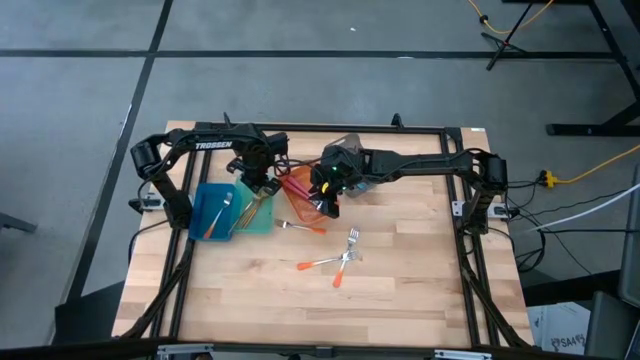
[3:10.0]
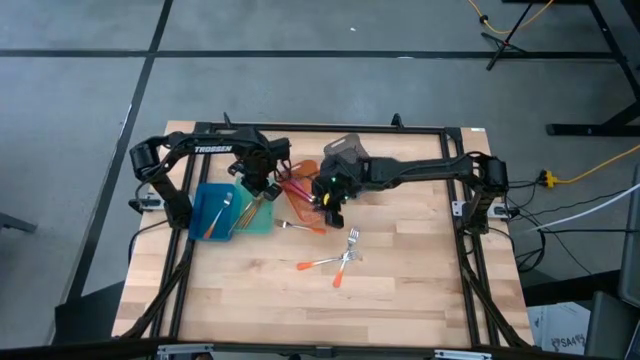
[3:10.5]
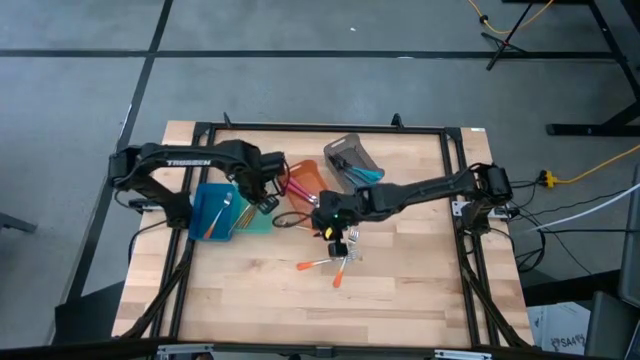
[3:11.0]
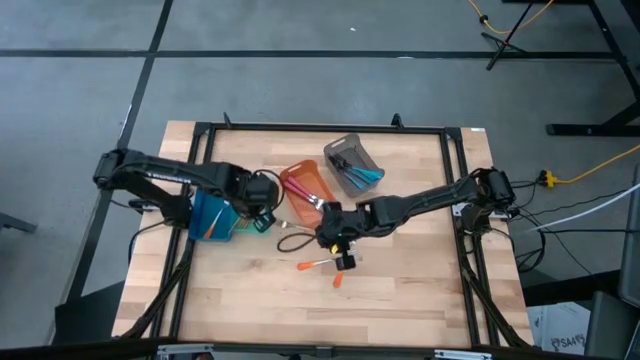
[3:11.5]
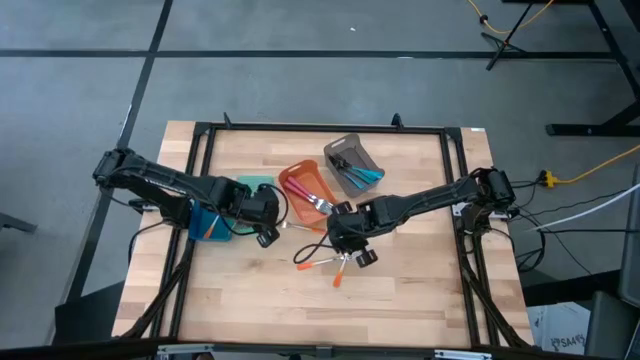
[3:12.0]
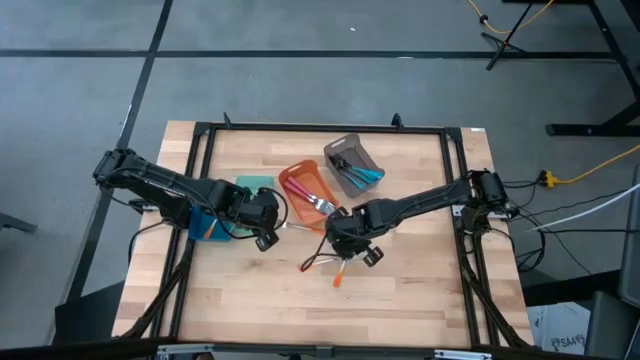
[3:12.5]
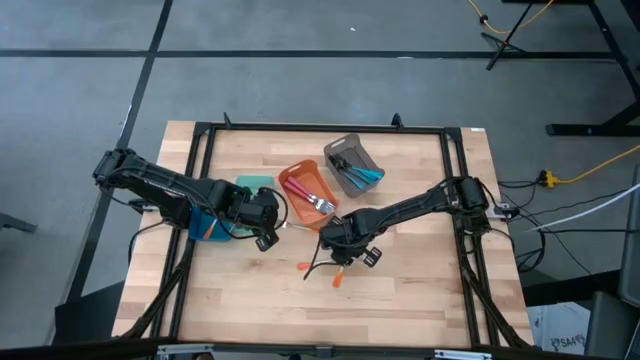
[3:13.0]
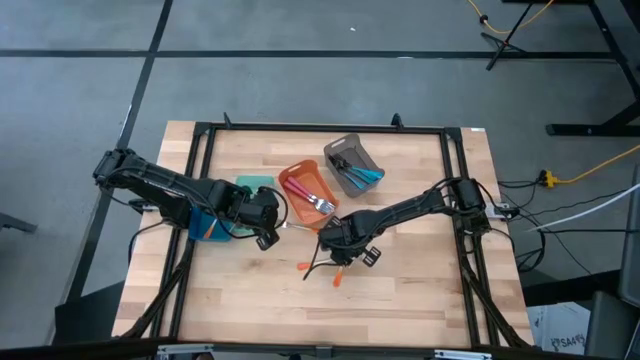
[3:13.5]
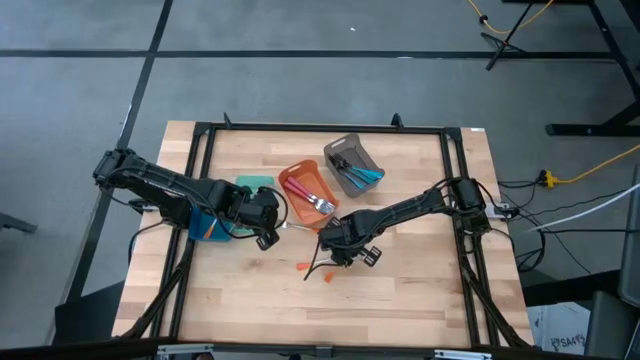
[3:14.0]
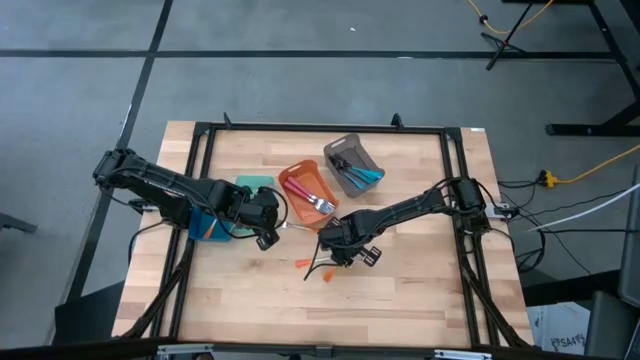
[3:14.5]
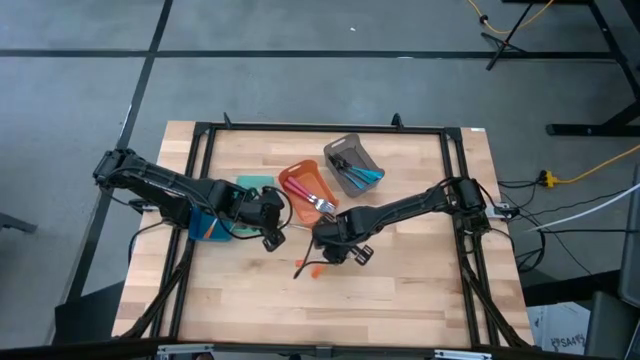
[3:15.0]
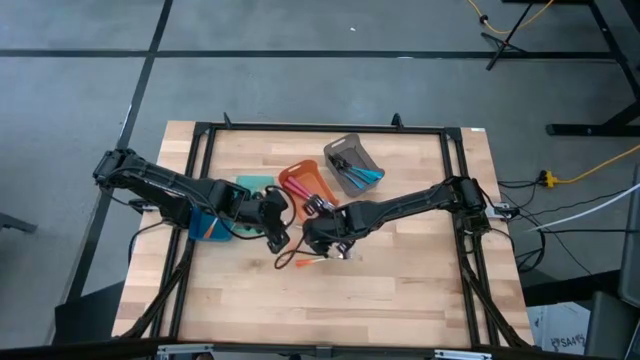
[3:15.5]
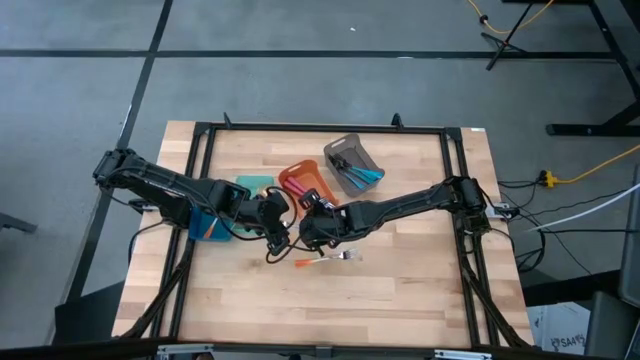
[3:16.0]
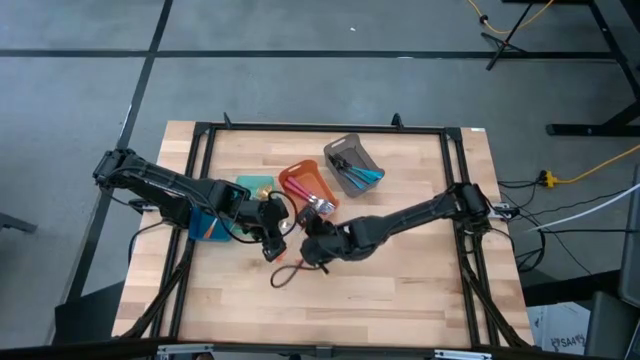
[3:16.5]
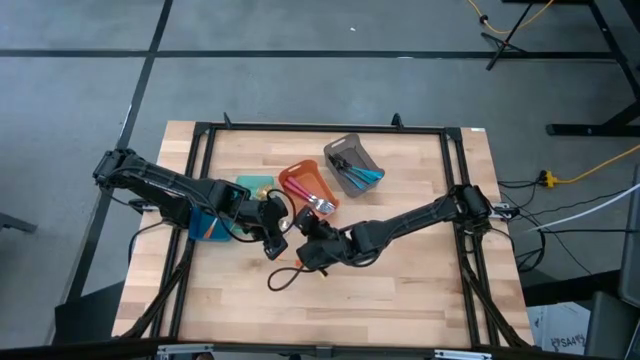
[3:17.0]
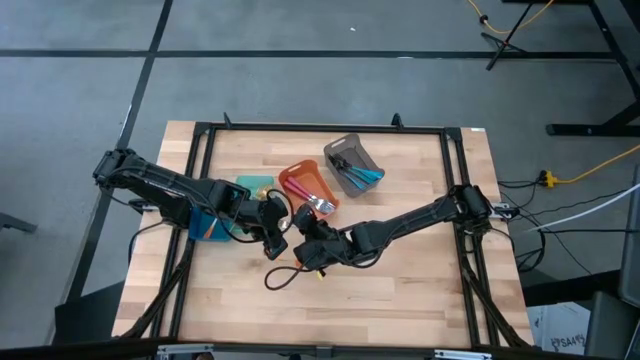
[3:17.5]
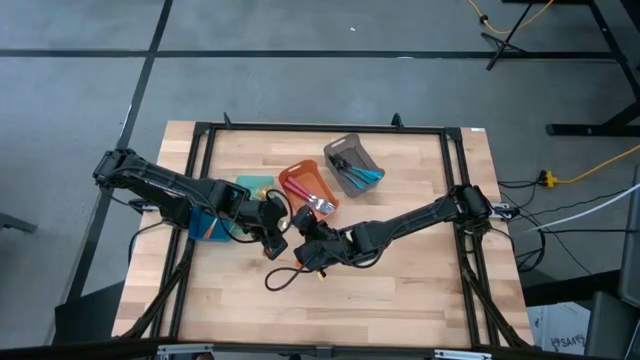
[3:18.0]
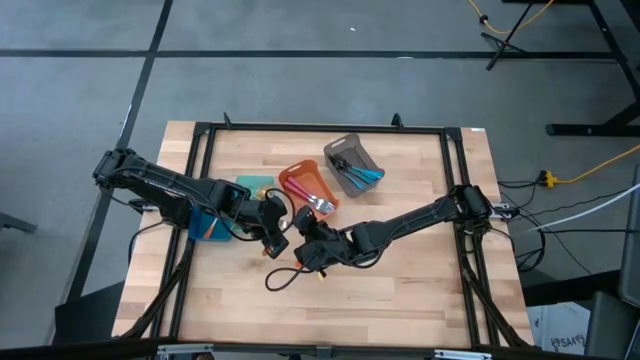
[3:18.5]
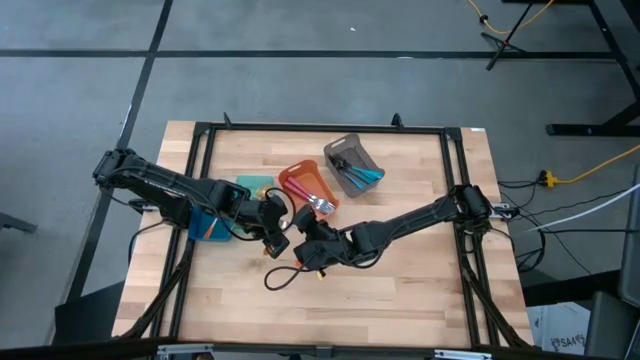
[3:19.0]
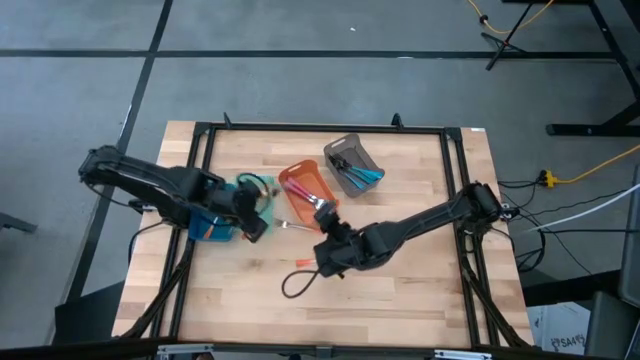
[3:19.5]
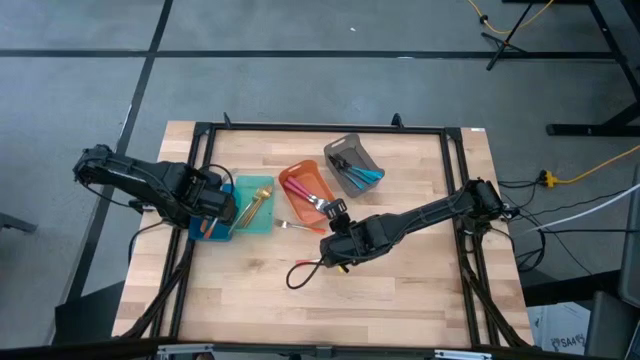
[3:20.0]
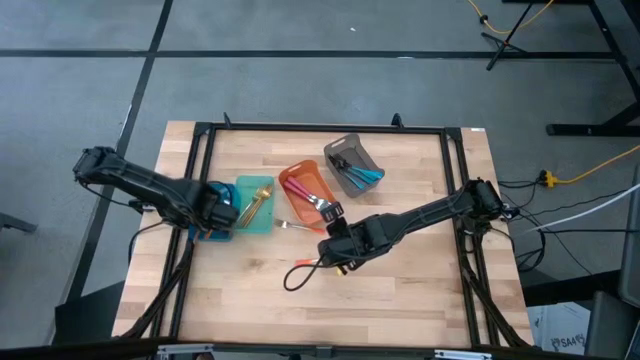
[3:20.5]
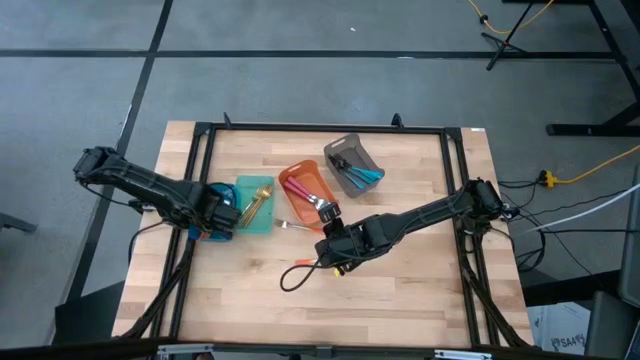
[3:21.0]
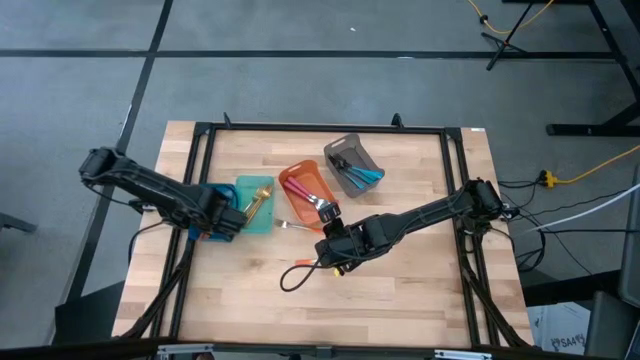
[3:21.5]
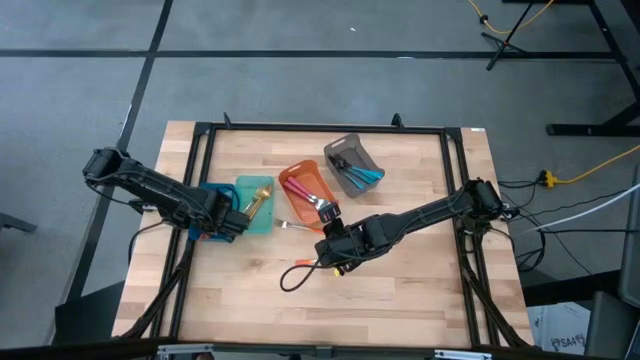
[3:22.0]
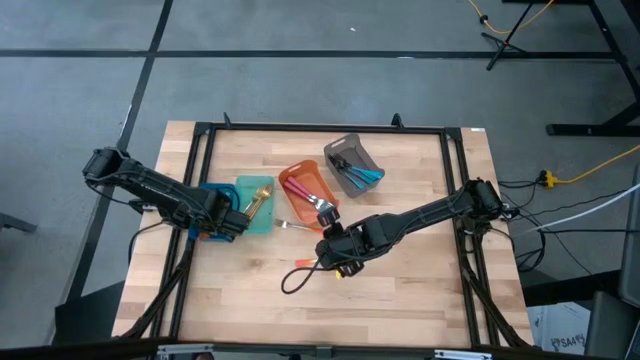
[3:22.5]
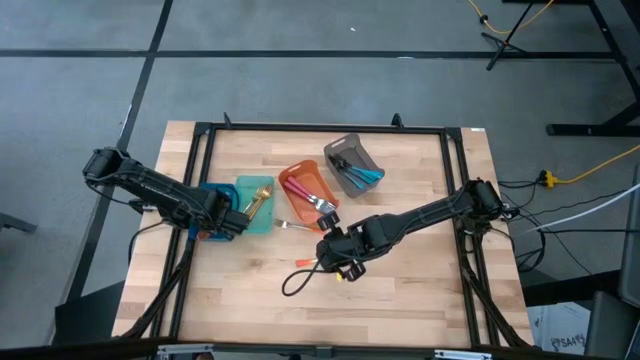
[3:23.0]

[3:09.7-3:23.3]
Task: Sort silverware by color (type)
Put the orange fork into the blue bin

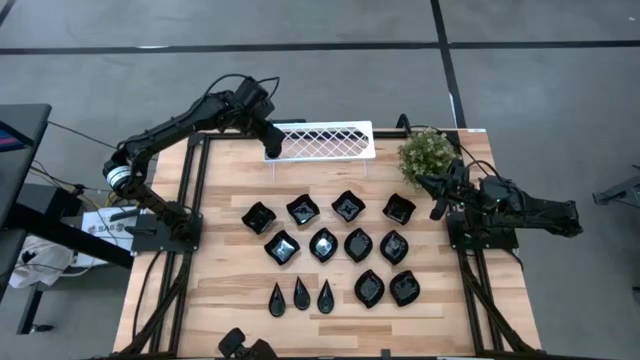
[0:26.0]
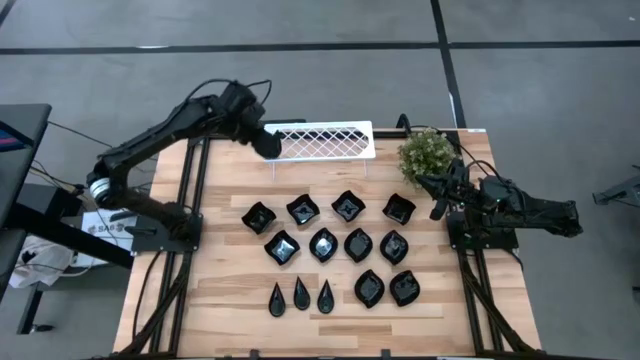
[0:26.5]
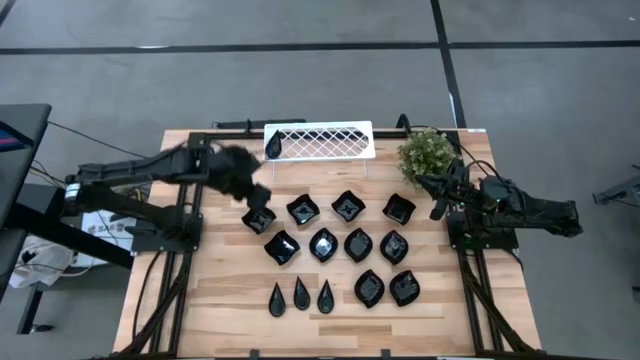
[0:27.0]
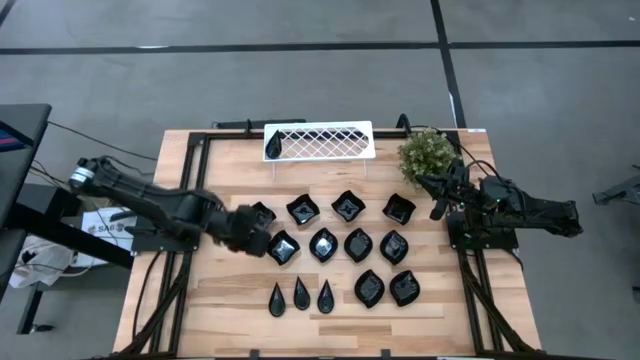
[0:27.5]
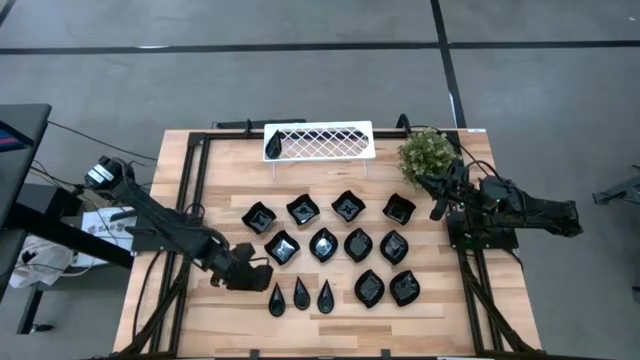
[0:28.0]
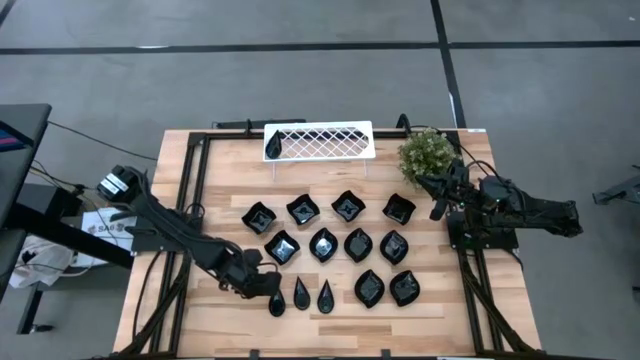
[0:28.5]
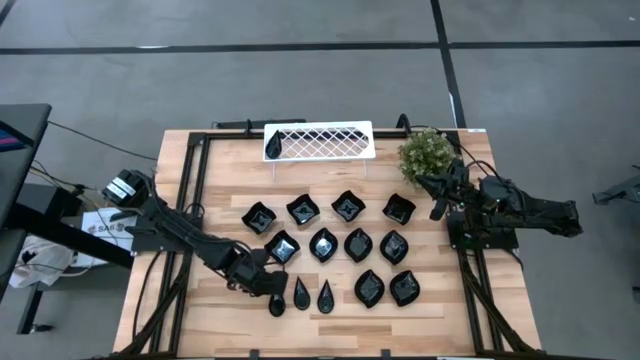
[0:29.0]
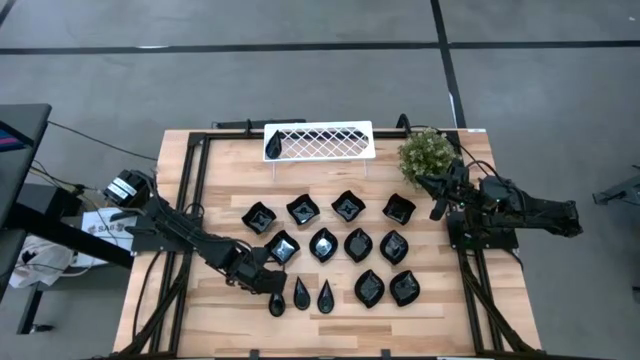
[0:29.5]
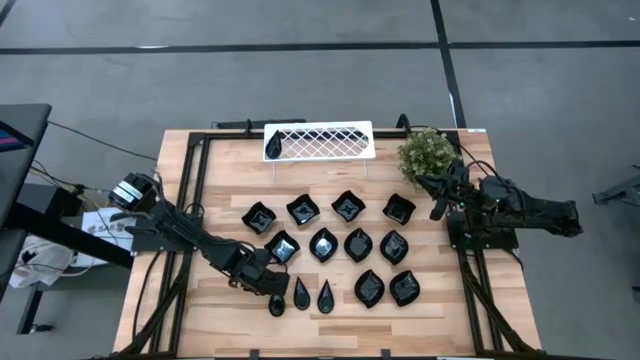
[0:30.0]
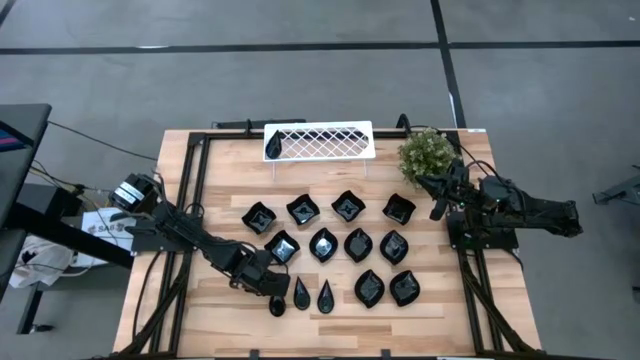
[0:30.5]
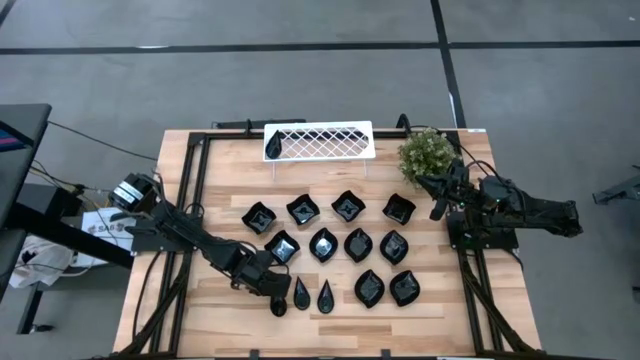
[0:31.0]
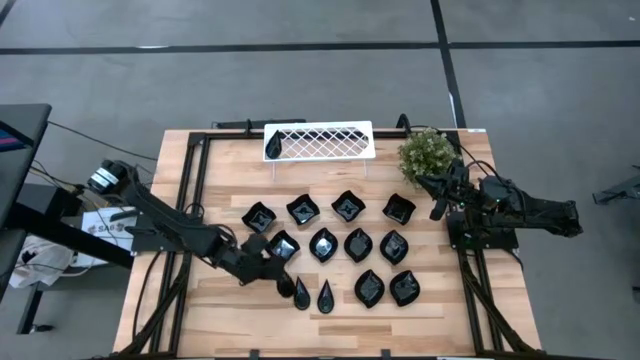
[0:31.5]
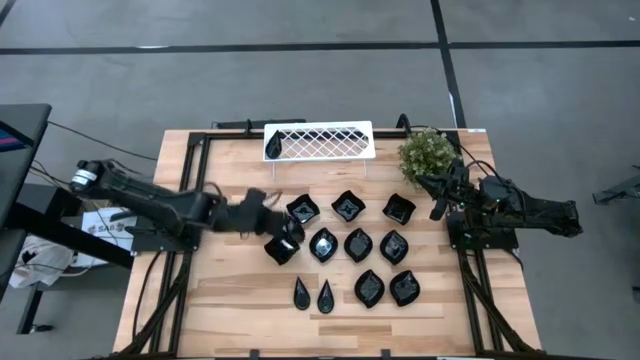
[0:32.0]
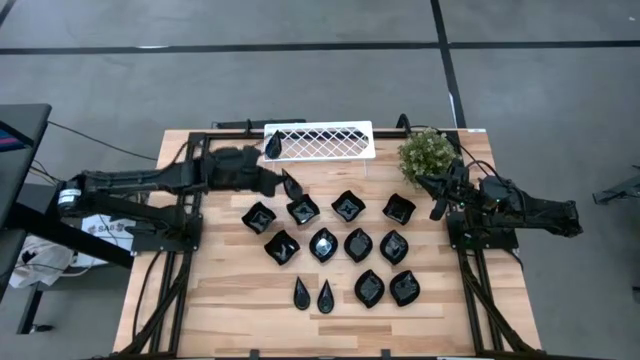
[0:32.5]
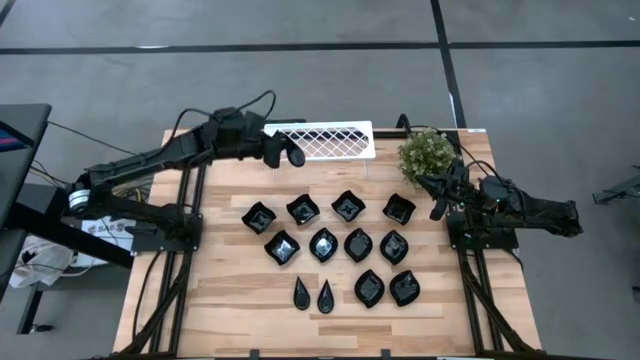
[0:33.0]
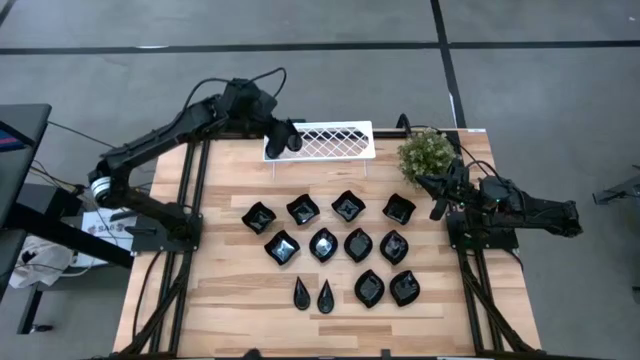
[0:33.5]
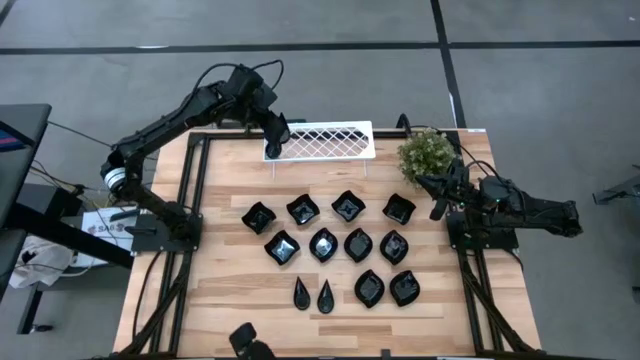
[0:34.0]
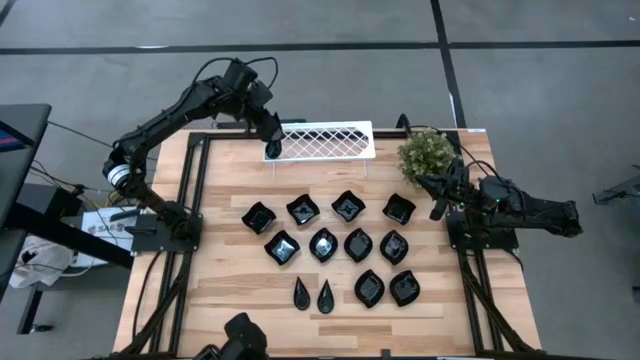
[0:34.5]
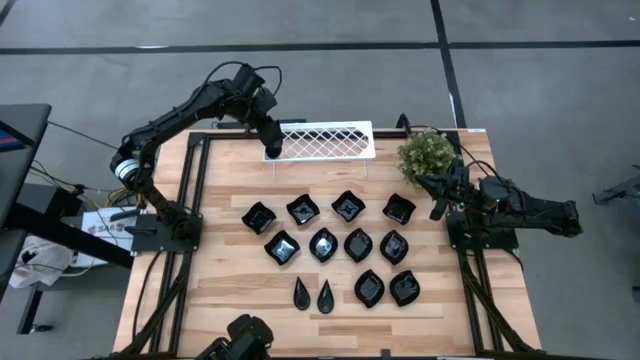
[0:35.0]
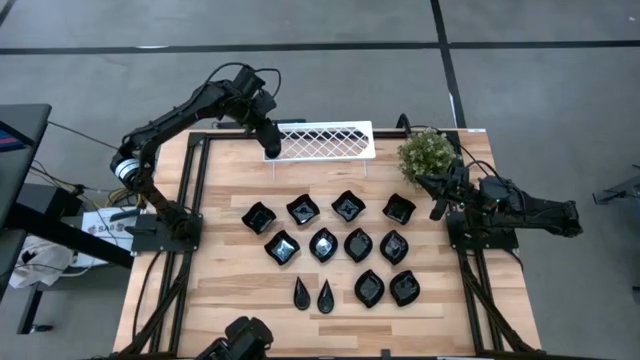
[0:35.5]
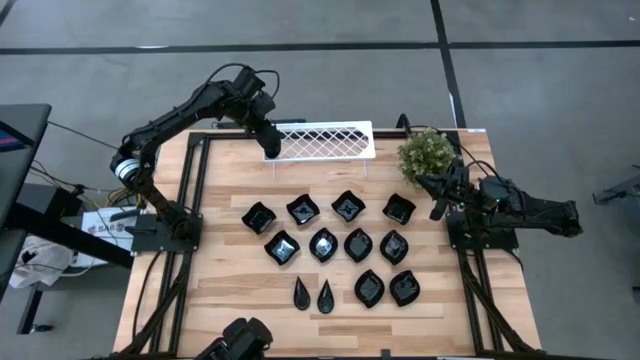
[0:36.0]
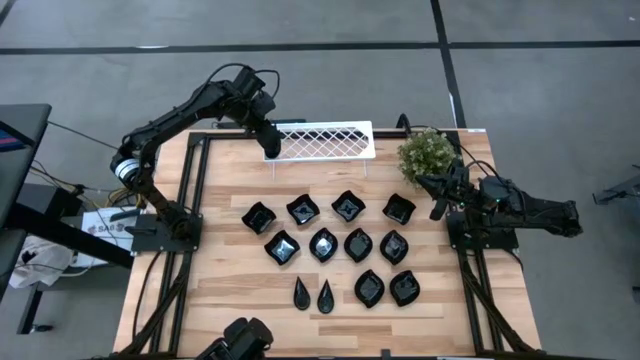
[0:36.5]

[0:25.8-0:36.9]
Task: Pick & Place Mini shaped plates
Stack the black drop-shaped plate on top of the black drop-shaped plates on the shelf
